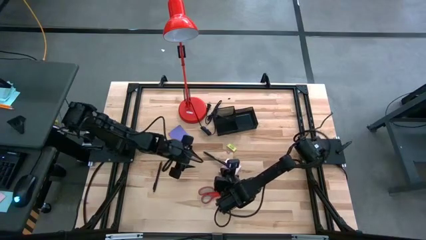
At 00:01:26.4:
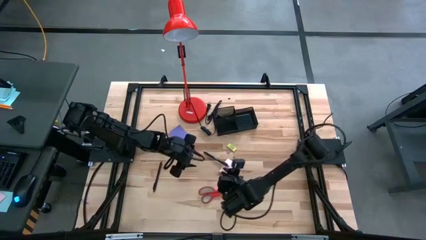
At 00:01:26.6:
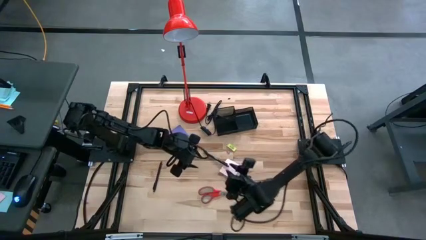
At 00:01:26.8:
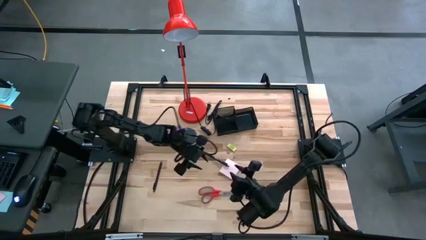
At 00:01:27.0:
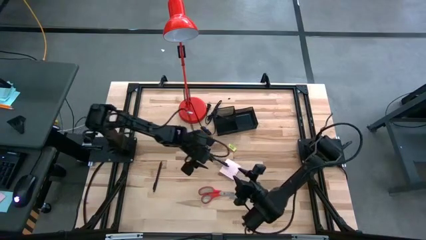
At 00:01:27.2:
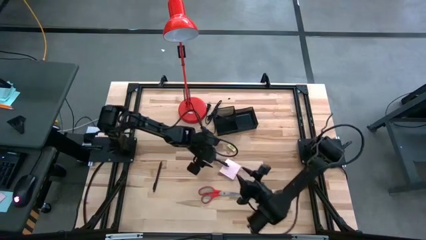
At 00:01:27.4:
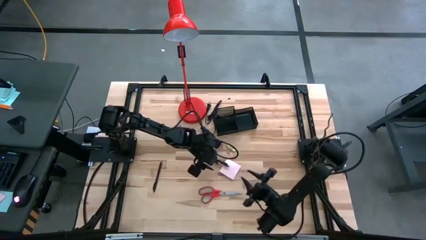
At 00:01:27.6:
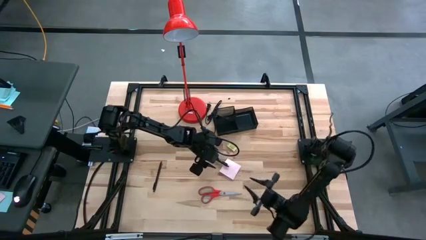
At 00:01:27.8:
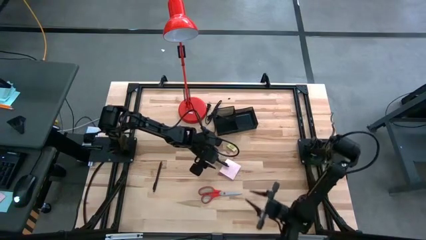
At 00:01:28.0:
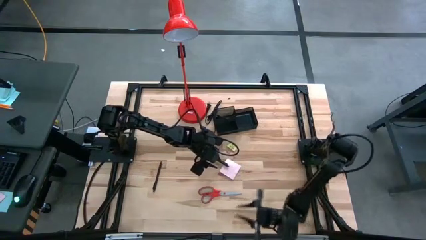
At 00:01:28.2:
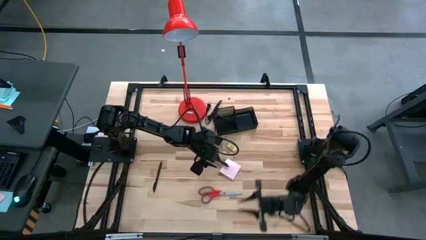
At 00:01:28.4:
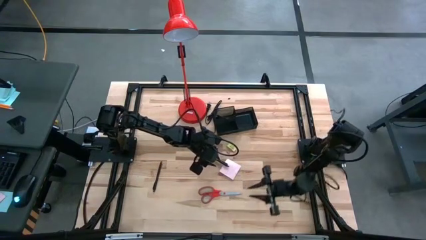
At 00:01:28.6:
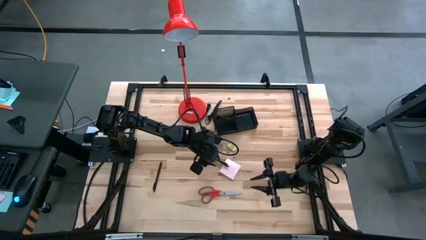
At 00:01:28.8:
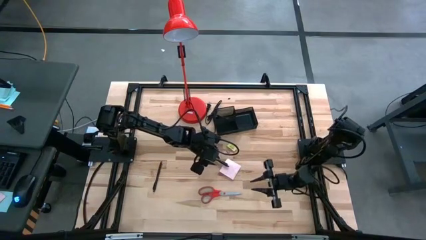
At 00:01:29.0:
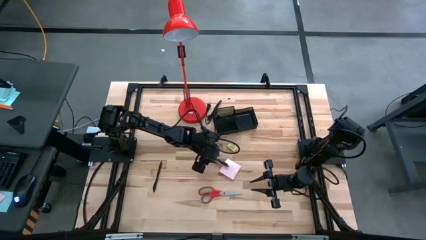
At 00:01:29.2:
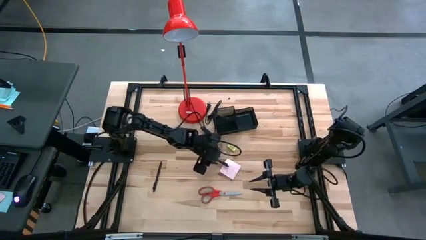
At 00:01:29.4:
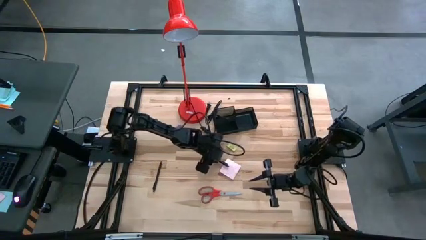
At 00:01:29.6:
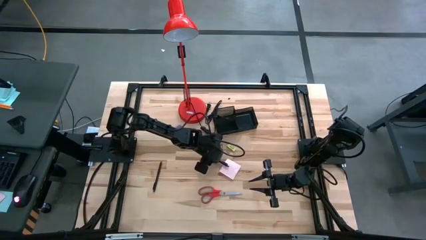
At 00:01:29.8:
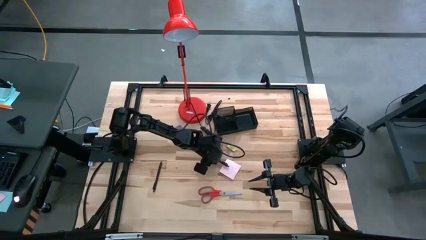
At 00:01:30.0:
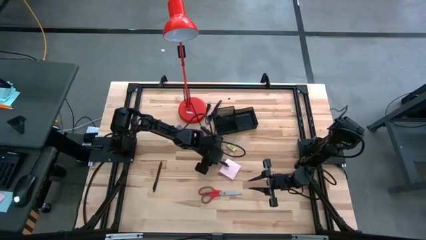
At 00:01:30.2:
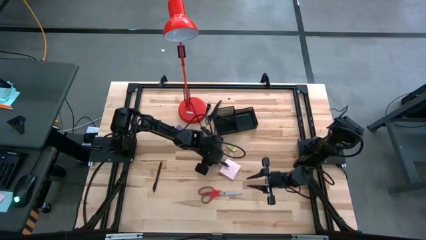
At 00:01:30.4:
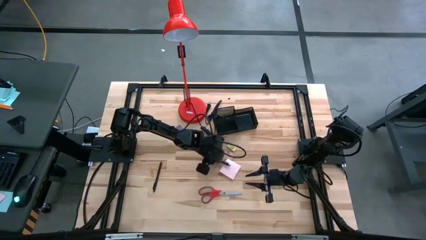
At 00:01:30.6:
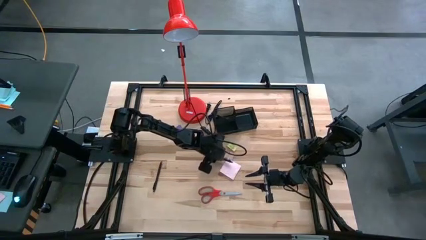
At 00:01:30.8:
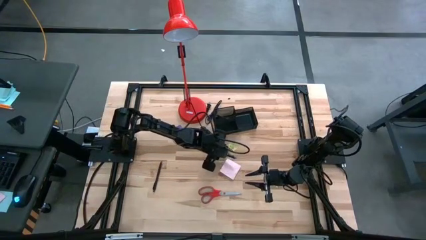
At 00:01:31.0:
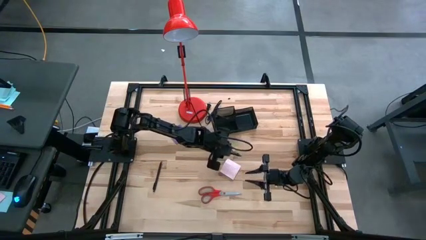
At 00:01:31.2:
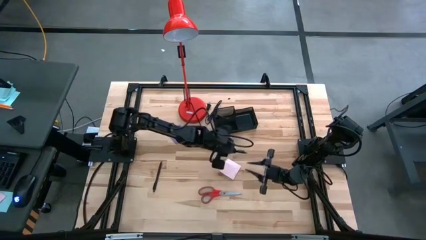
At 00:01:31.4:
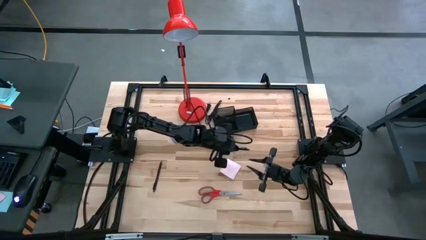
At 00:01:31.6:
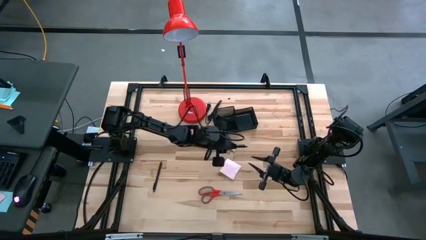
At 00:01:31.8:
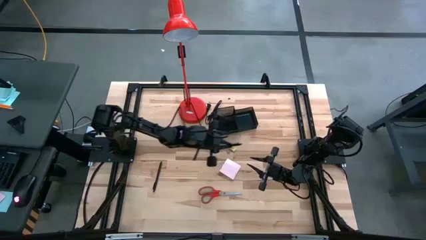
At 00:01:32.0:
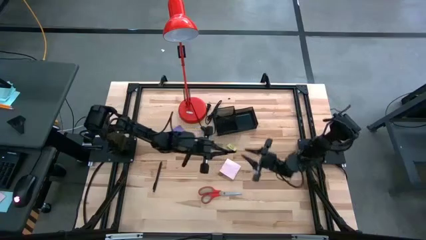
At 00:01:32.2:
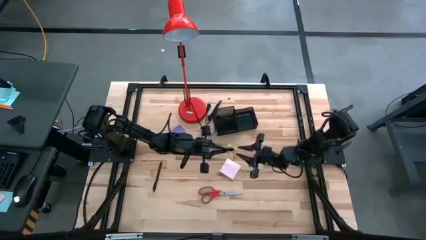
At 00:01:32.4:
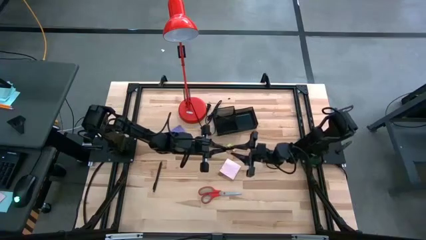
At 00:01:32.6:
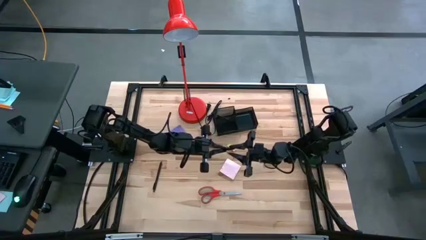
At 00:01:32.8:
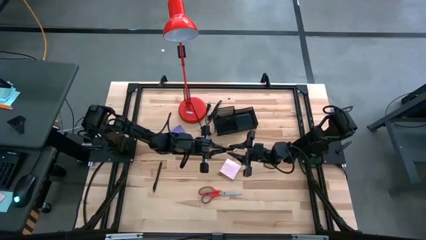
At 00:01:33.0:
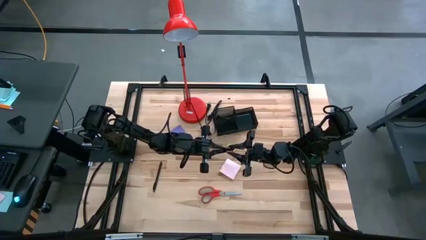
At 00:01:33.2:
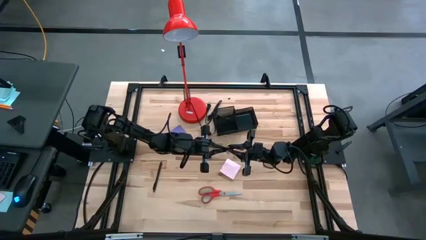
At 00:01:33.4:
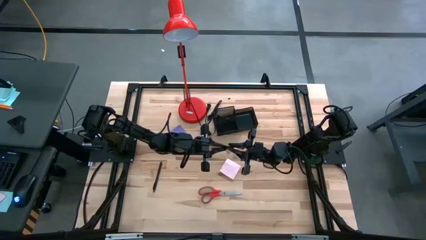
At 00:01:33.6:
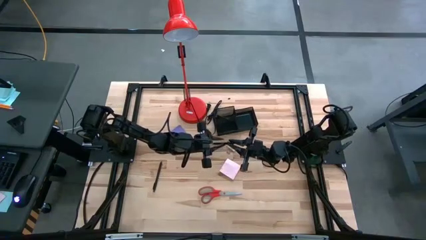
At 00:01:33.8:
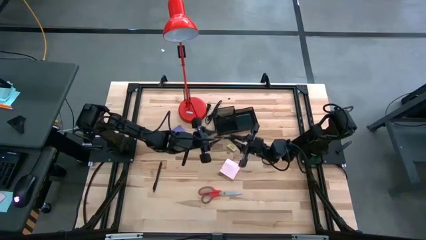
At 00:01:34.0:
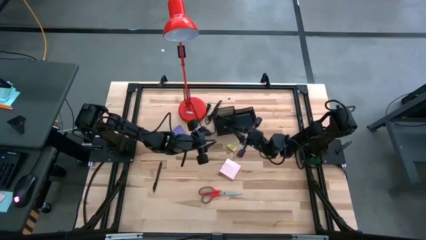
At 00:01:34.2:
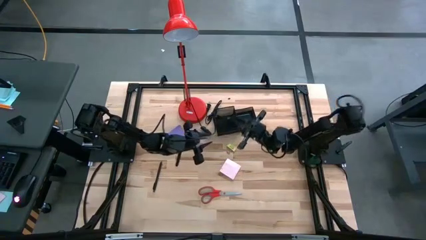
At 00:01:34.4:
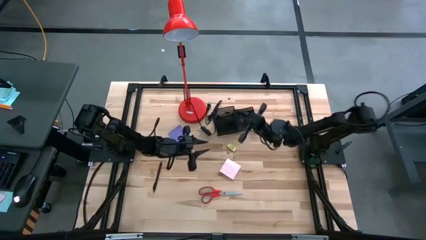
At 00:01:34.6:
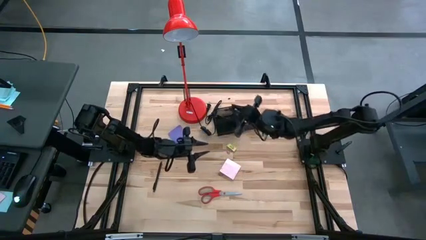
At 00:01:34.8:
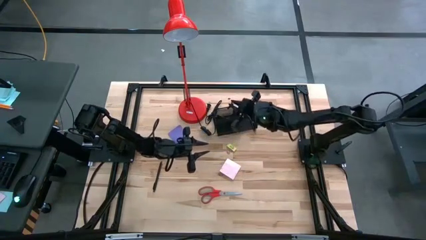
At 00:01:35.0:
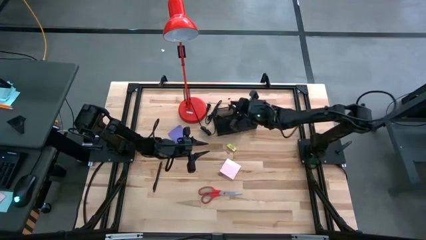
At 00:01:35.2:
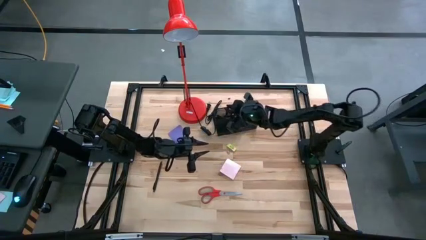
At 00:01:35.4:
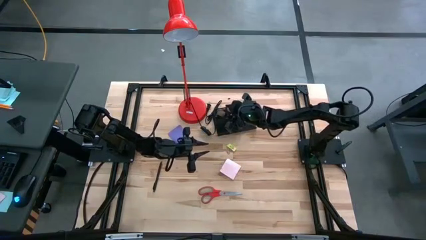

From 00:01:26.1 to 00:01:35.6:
Task: Pick and place office supplies into organizer
Put the black pen into the black desk organizer

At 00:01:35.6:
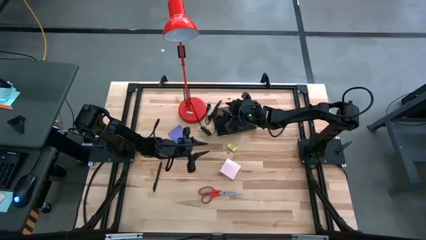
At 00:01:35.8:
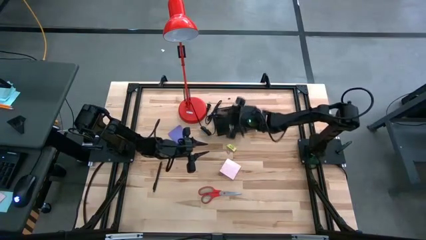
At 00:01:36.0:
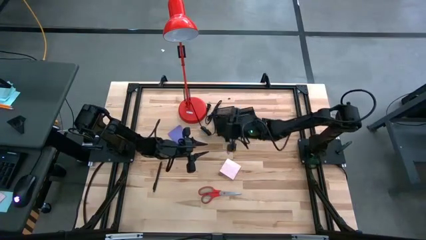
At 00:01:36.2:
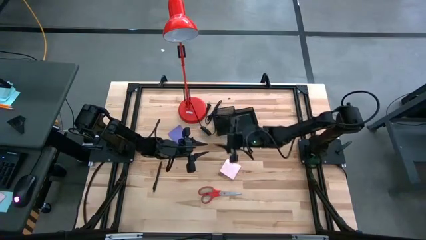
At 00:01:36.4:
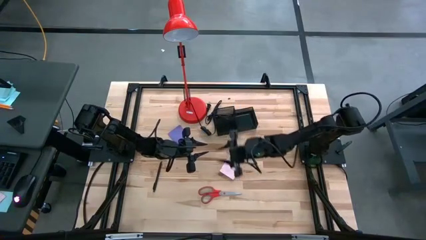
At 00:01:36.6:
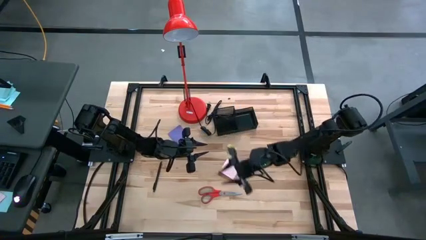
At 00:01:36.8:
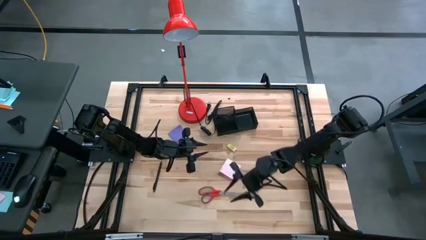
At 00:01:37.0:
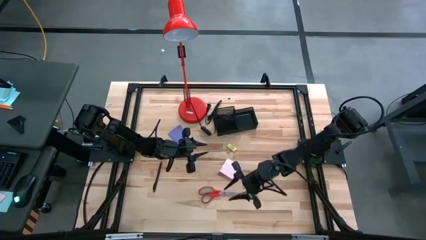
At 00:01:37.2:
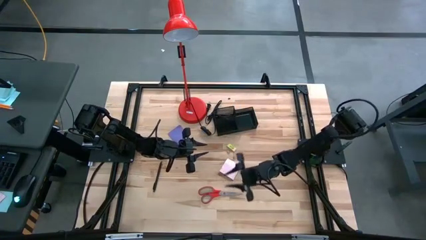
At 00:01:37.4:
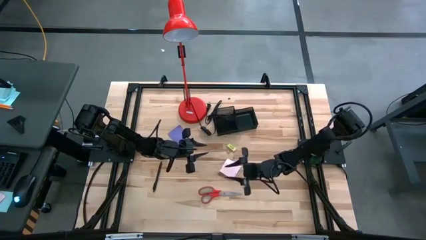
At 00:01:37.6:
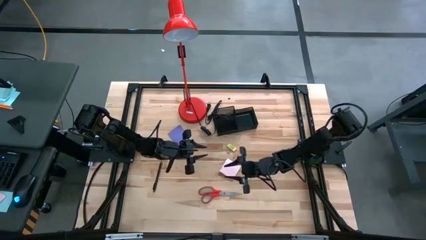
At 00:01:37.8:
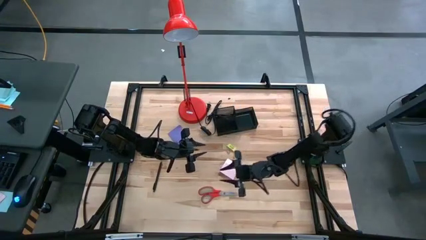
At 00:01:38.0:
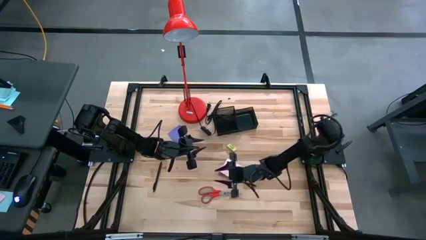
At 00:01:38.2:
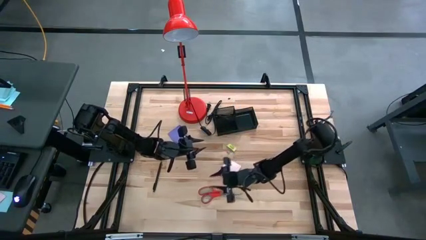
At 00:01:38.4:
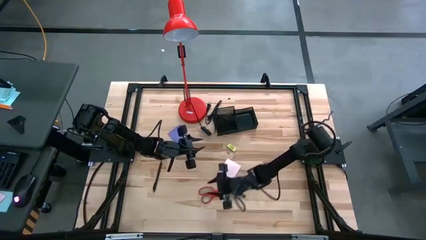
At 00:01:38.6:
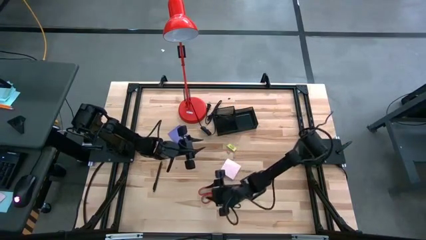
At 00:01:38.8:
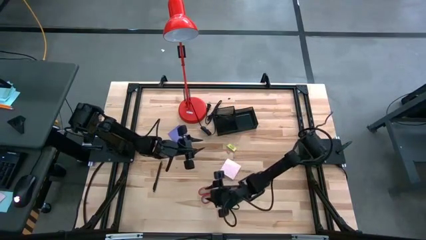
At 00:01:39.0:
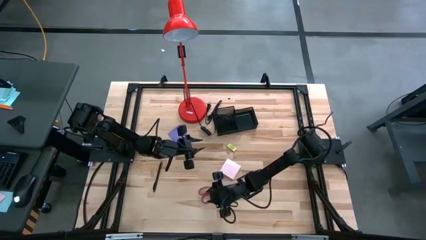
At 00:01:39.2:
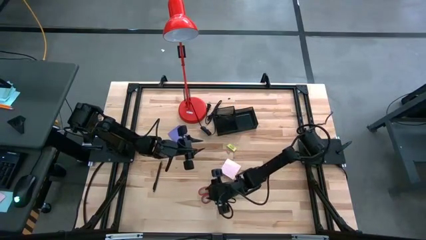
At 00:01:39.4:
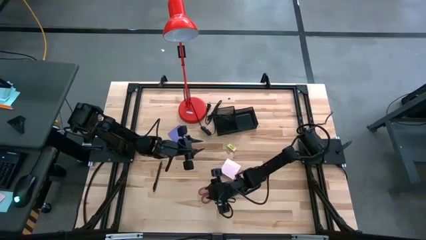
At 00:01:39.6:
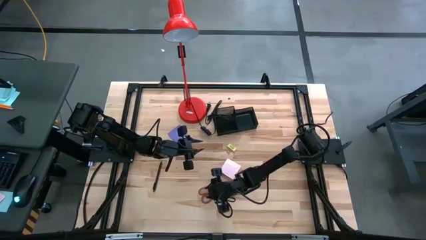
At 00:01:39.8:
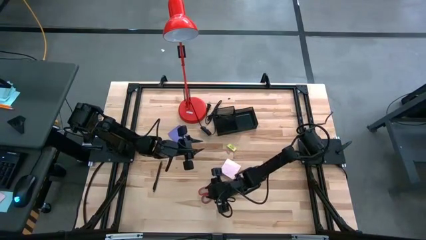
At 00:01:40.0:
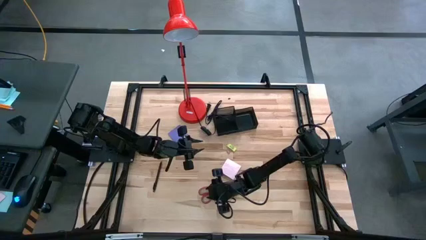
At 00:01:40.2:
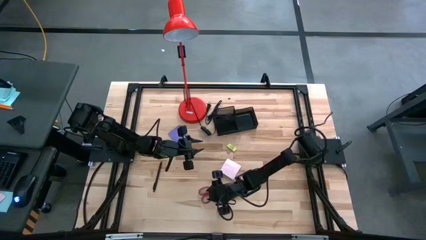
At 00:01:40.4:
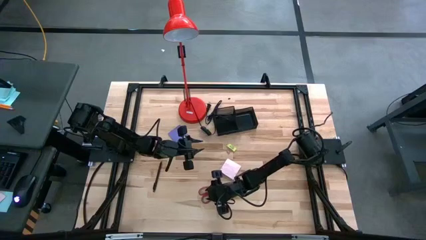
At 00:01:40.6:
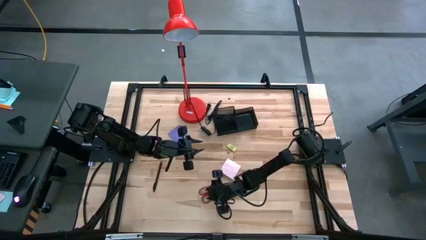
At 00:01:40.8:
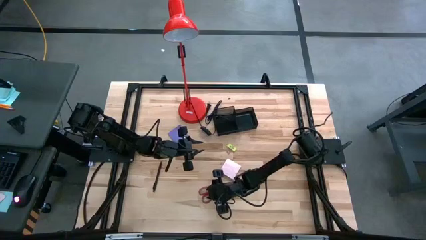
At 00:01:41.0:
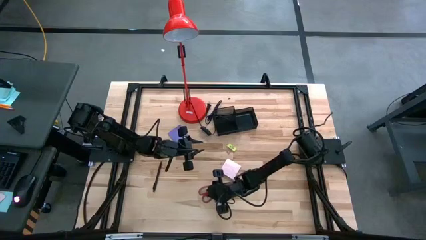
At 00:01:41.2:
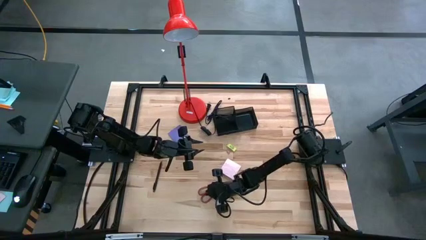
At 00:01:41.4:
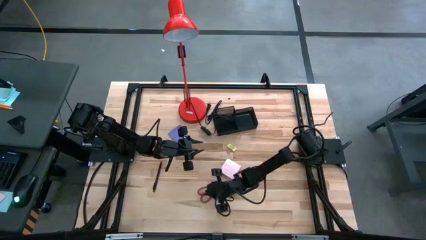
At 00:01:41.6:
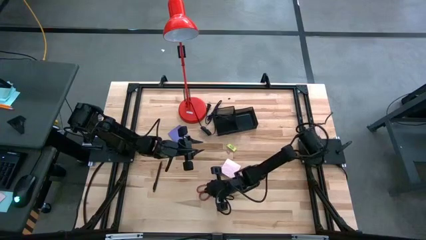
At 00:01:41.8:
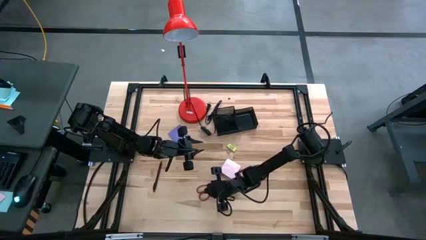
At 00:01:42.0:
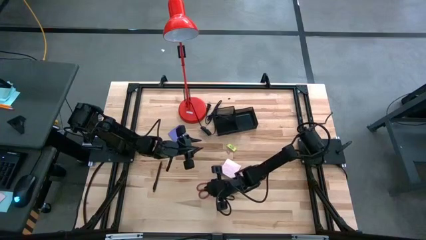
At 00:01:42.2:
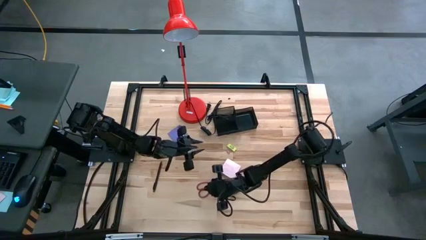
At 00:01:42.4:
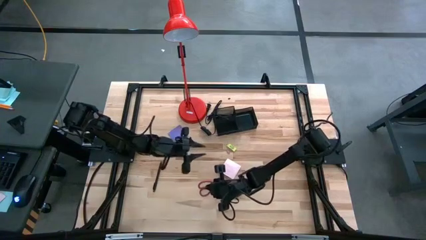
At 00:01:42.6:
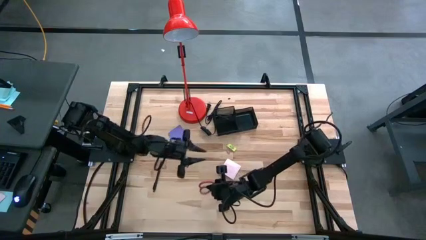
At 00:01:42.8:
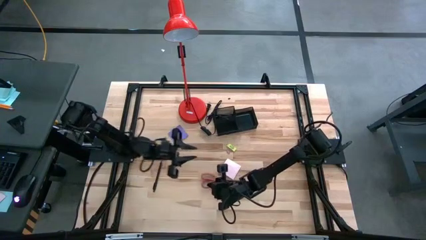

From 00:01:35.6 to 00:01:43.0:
Put the red scissors into the black desk organizer
